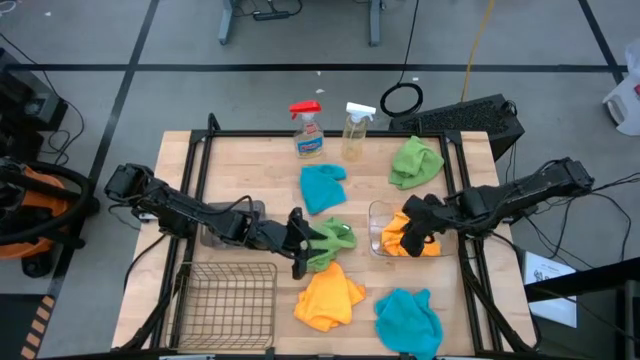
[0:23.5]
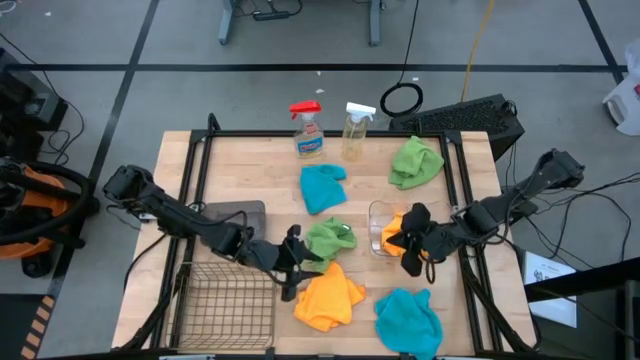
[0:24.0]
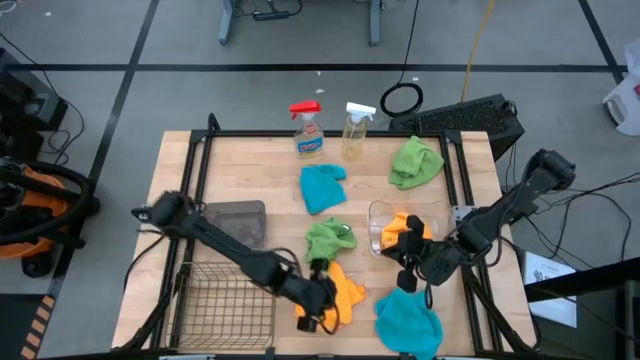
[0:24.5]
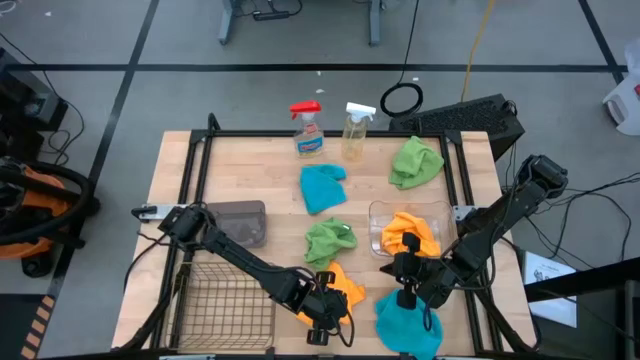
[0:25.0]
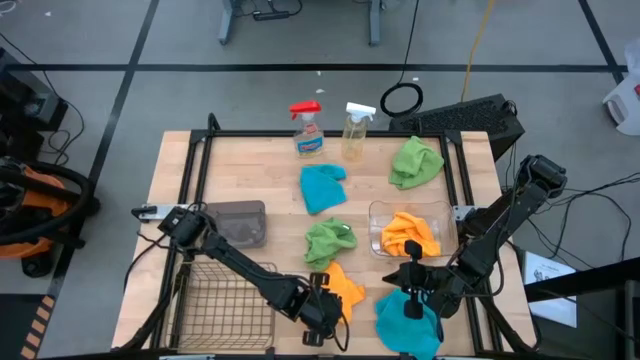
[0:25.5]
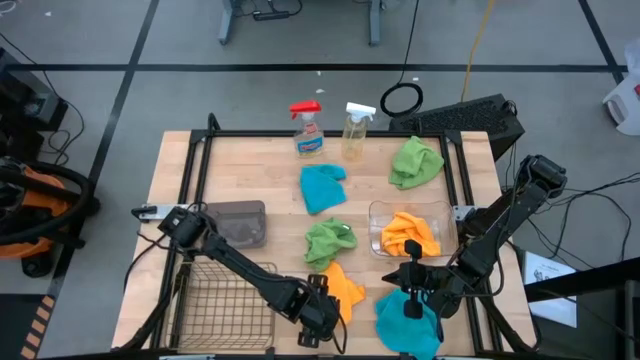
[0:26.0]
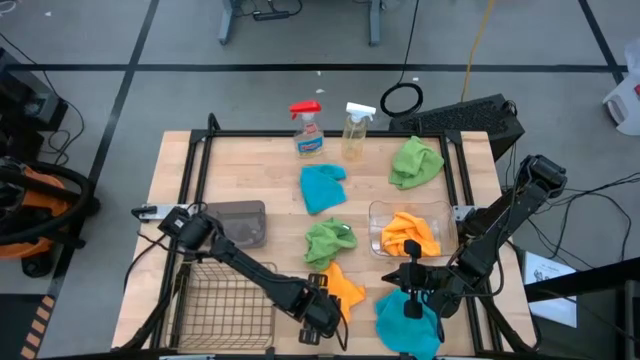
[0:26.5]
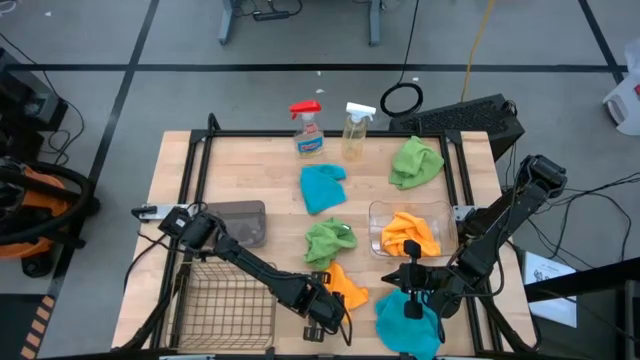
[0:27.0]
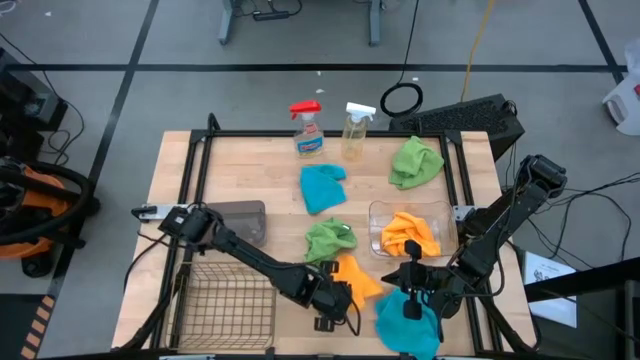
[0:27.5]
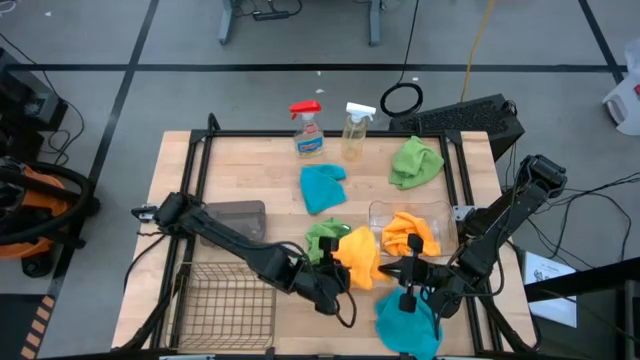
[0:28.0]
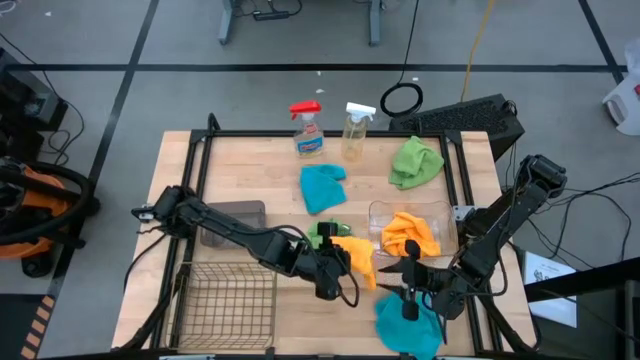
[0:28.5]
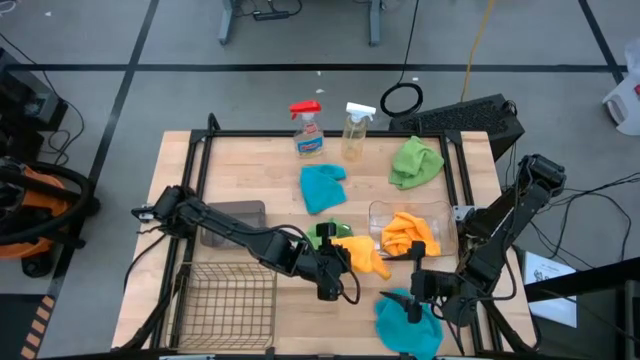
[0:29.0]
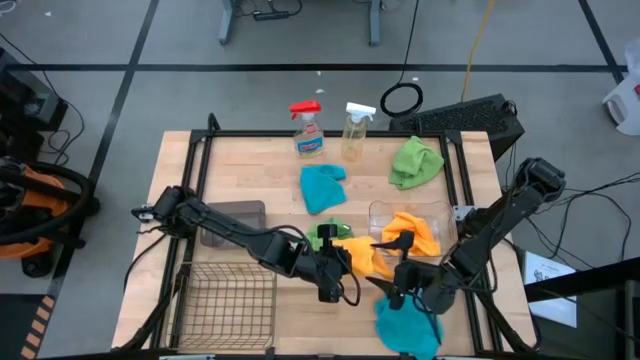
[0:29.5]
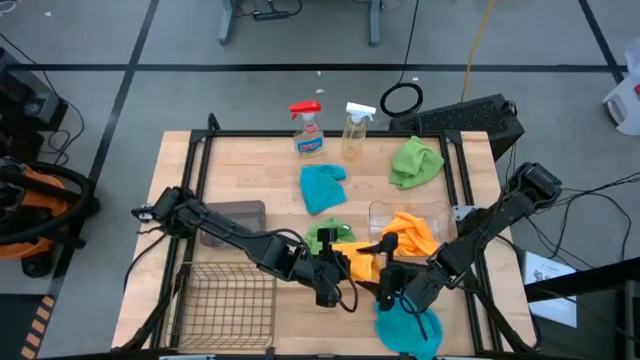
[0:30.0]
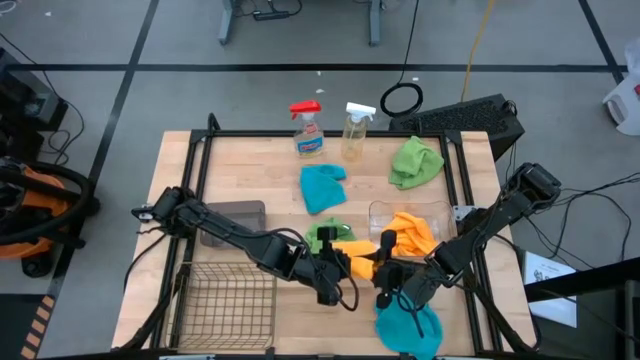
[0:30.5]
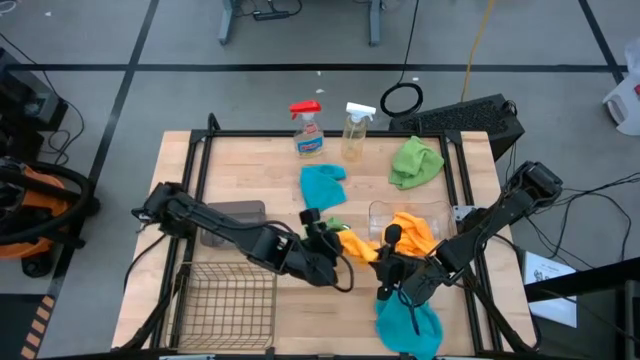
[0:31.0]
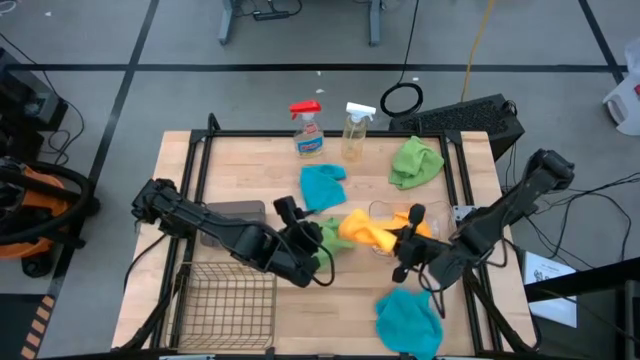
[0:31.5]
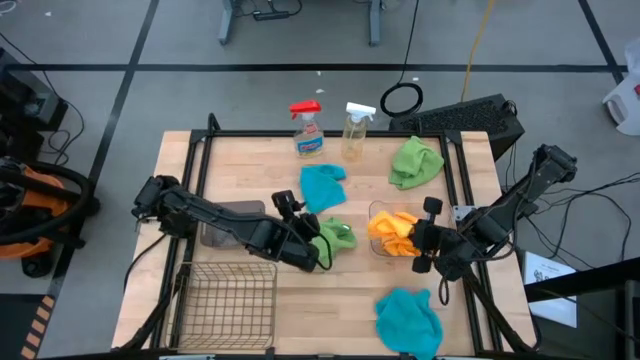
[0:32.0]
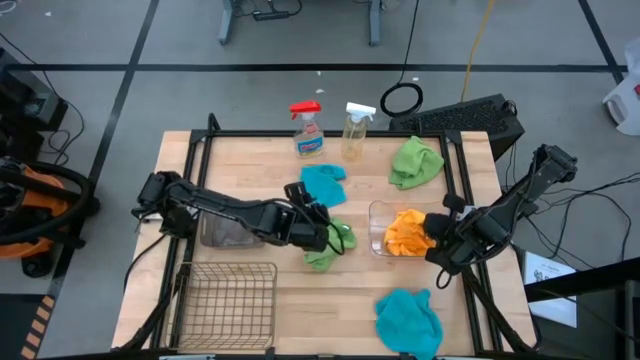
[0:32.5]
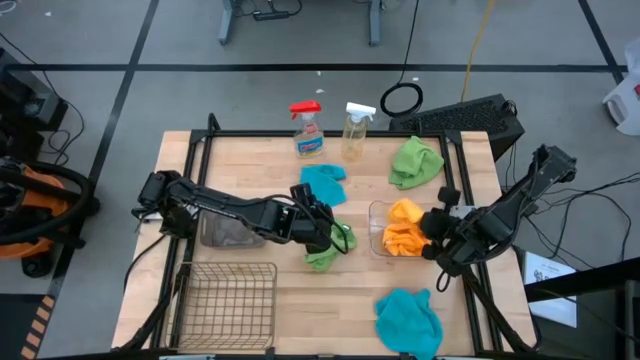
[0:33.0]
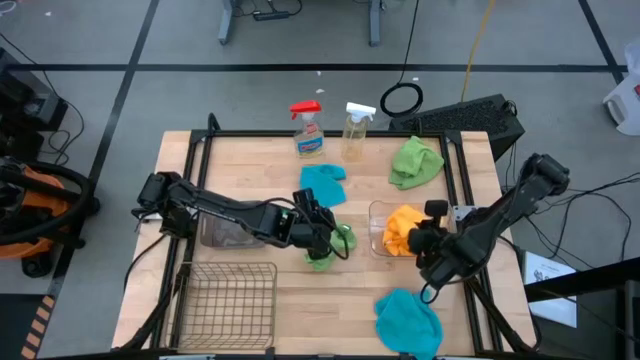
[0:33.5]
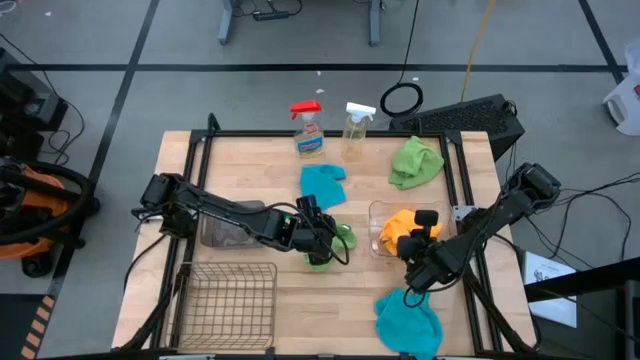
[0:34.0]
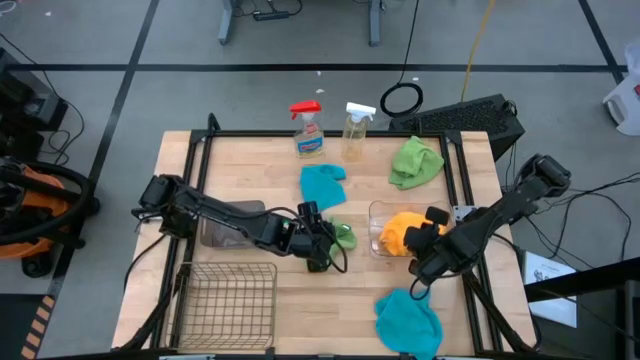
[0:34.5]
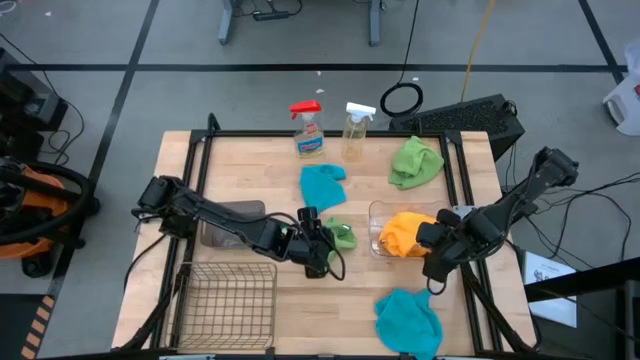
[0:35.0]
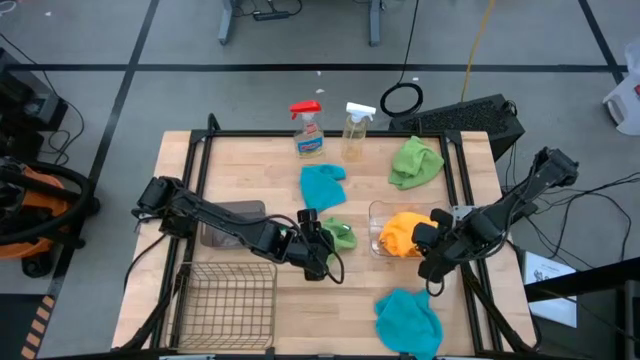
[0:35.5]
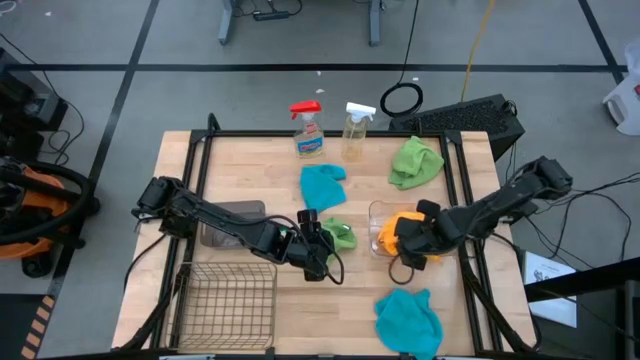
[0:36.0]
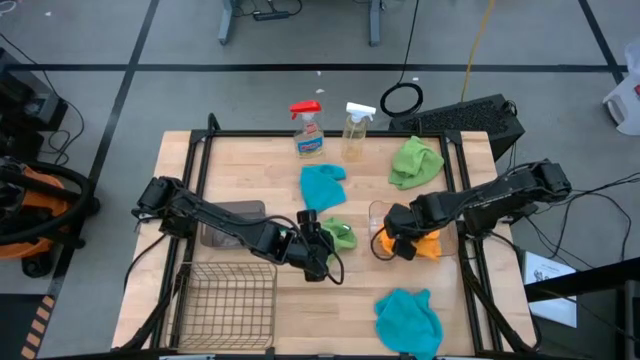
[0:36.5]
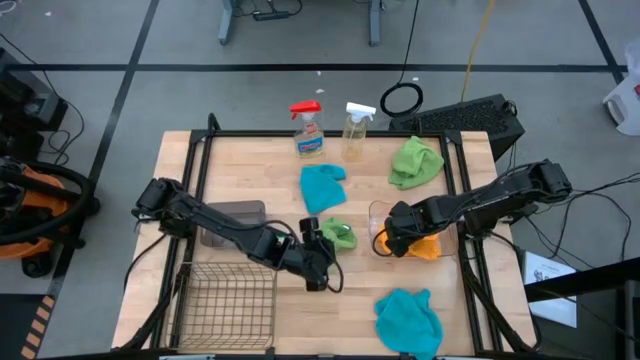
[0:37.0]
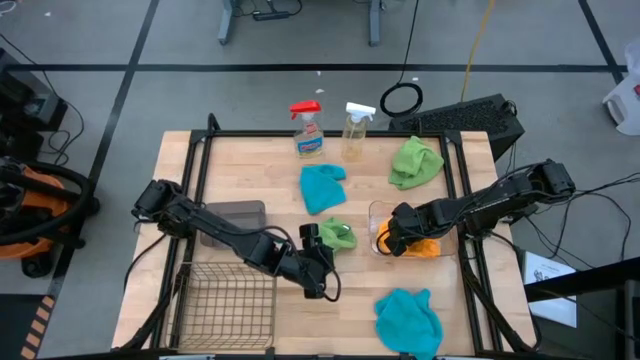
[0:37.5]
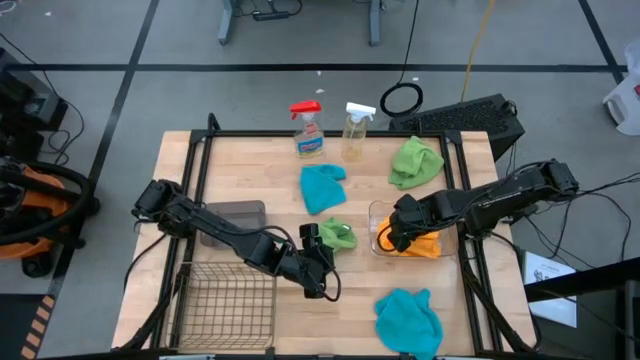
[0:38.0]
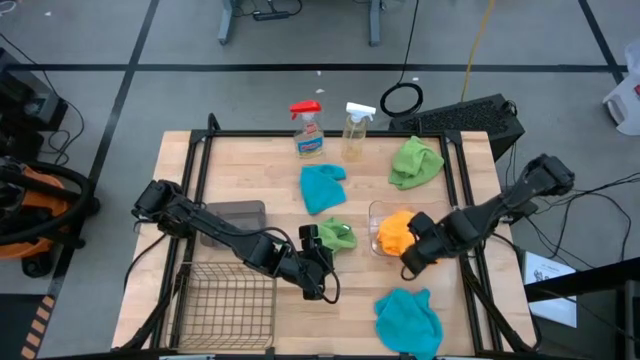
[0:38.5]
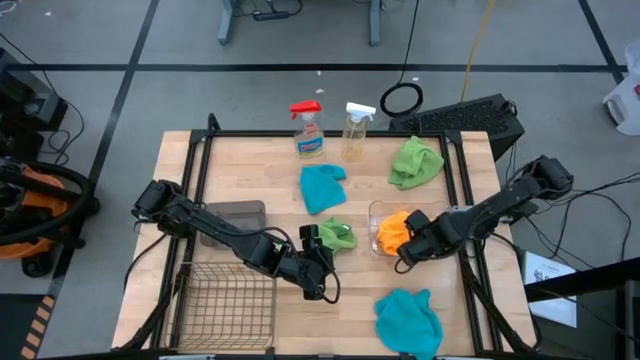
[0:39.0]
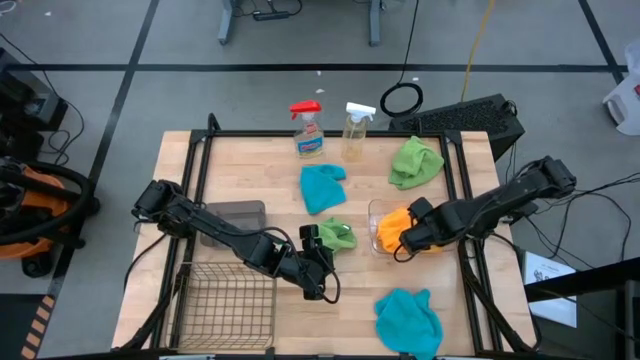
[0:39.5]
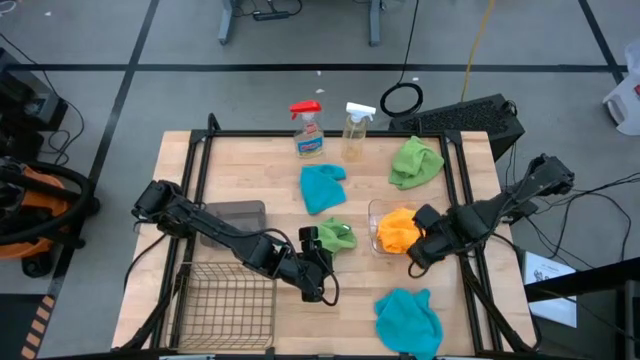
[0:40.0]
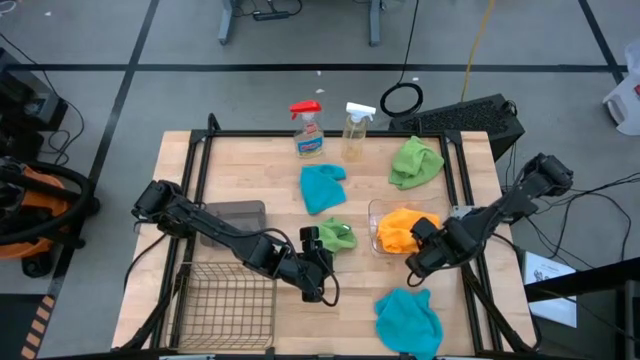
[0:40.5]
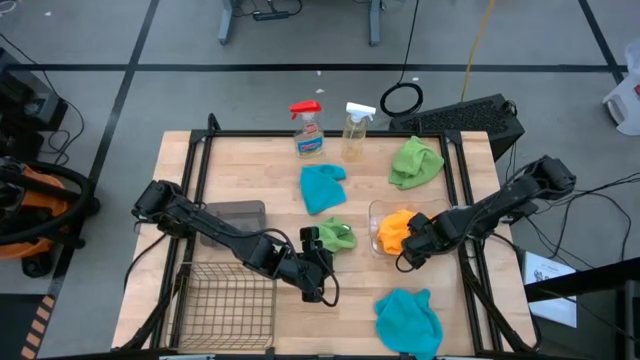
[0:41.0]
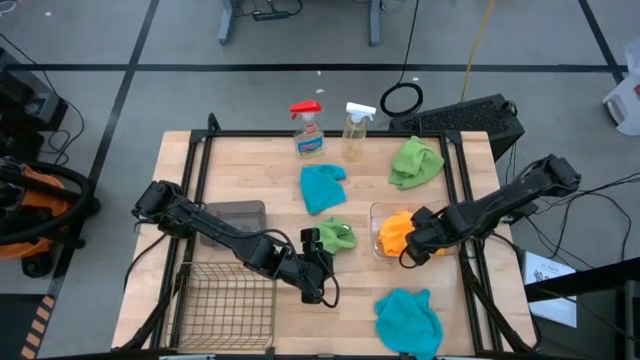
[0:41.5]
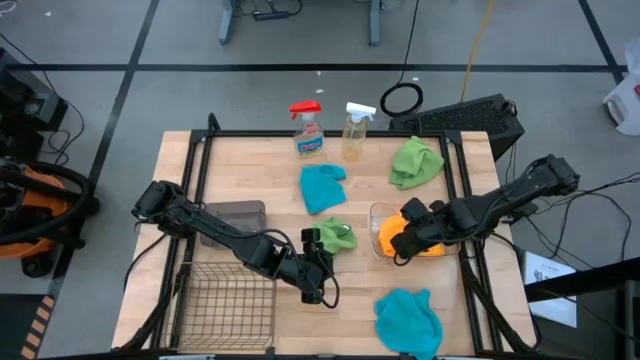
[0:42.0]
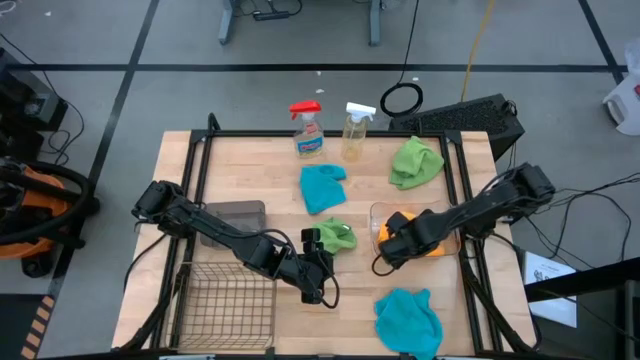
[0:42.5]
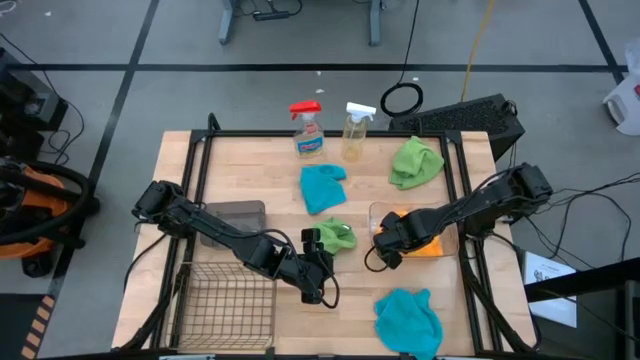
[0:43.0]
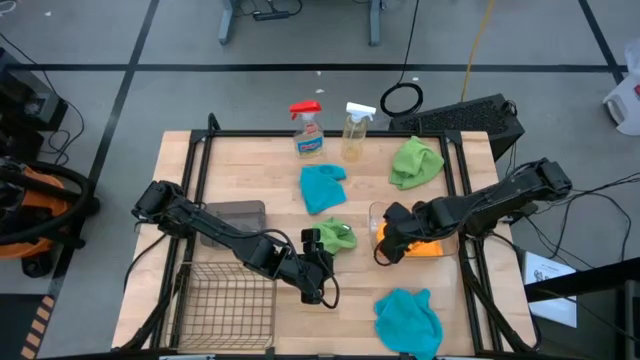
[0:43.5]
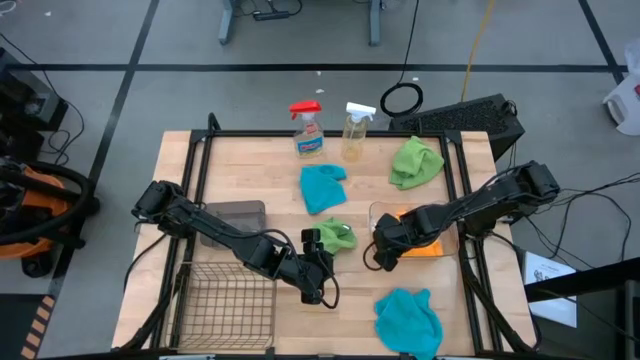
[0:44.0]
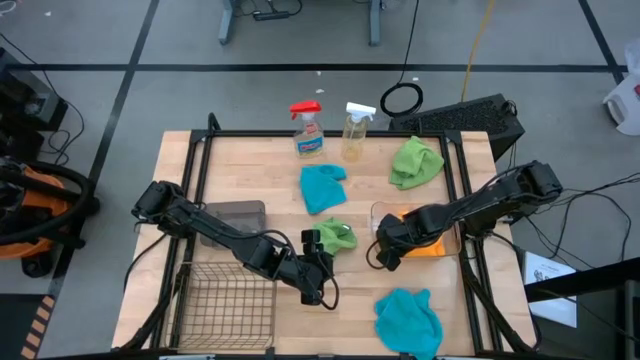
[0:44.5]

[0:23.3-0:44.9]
Task: Sort microfiber towel by color & place in baskets
Put the orange microfiber towel into the transparent bin

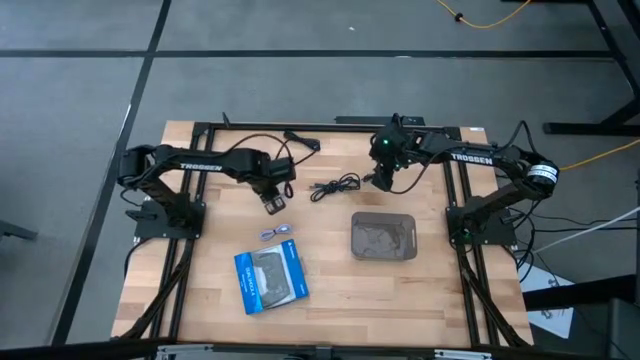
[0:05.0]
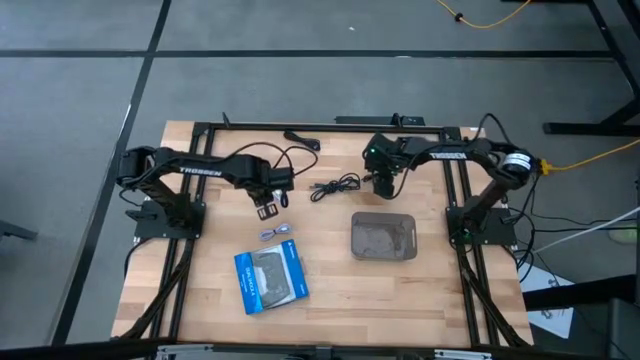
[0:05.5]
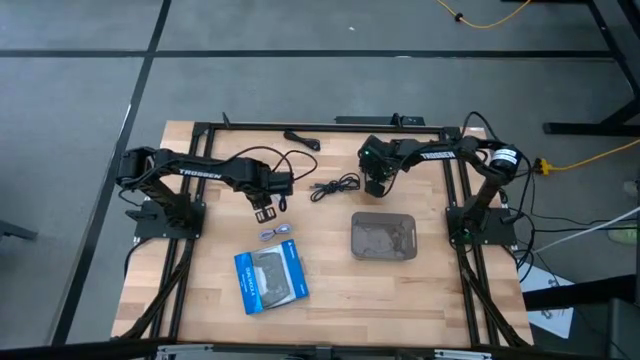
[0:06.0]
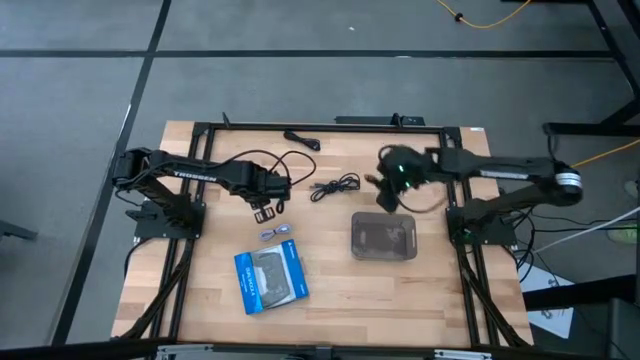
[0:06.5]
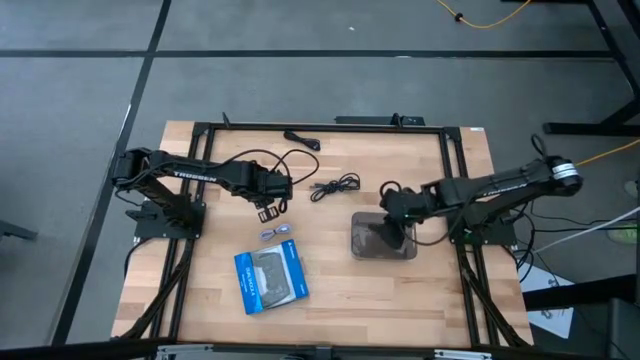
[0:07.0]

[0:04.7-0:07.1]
Task: Pick and place USB-C Cables
Put the bottom right black charger cable into the black bin
